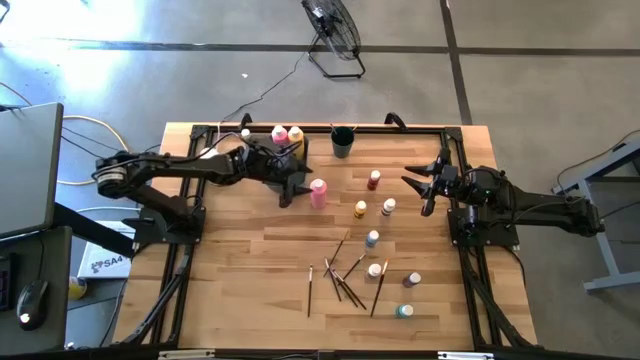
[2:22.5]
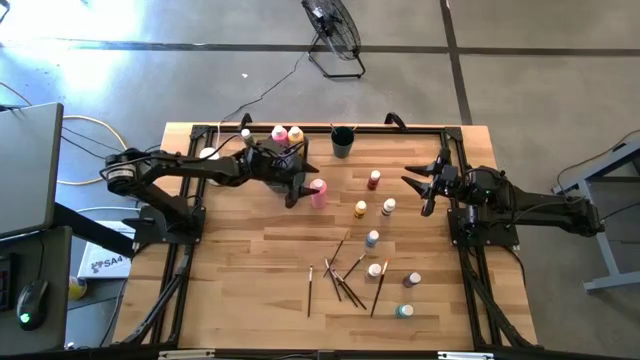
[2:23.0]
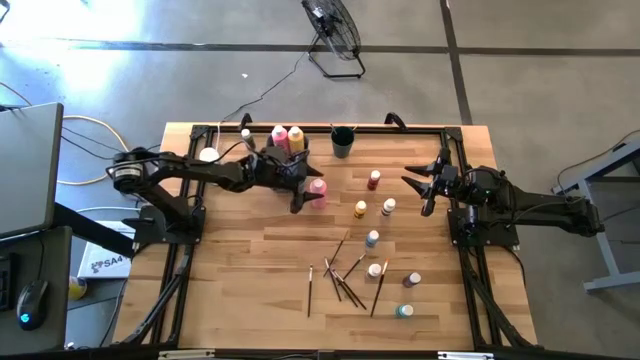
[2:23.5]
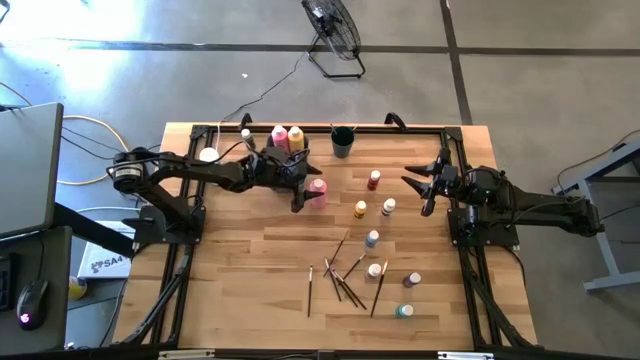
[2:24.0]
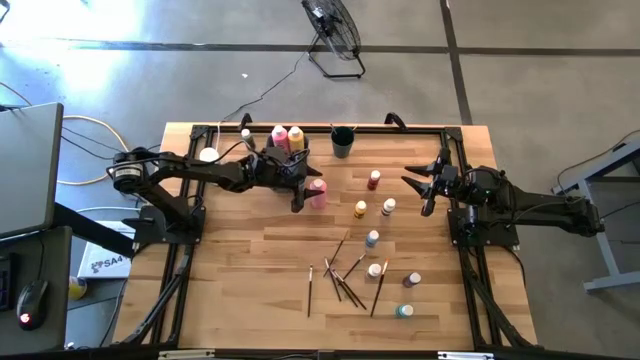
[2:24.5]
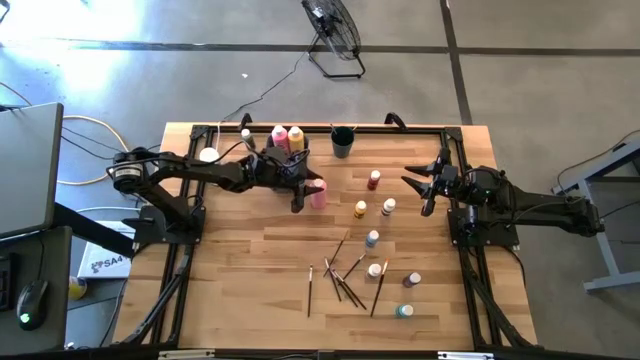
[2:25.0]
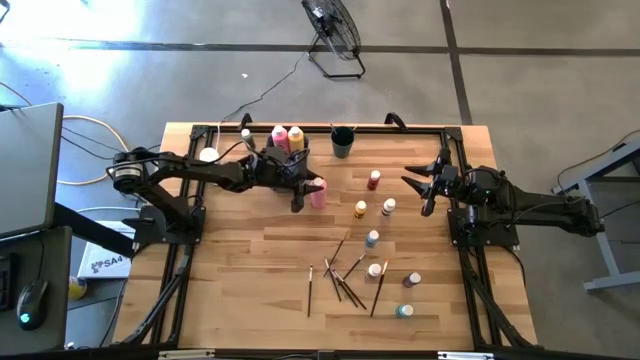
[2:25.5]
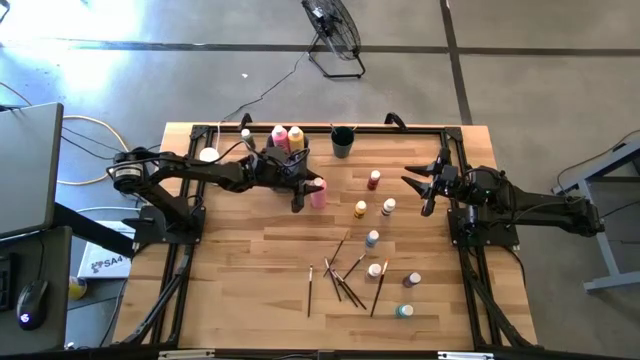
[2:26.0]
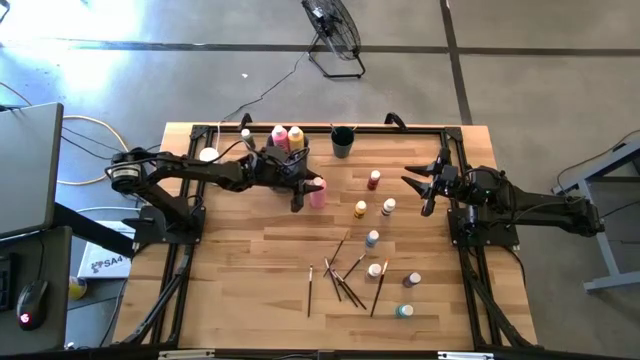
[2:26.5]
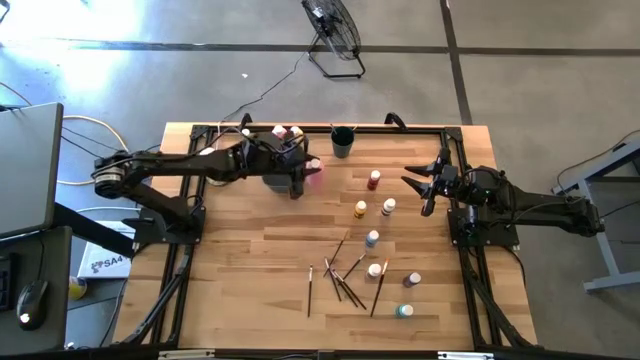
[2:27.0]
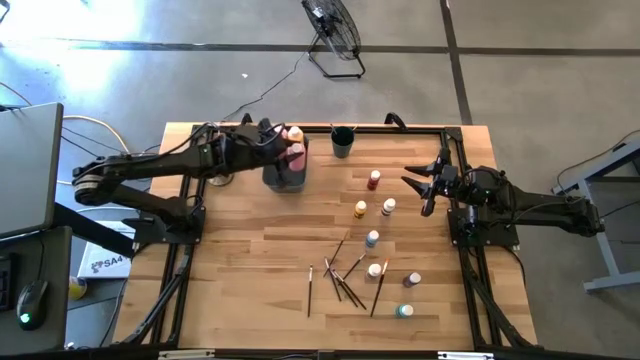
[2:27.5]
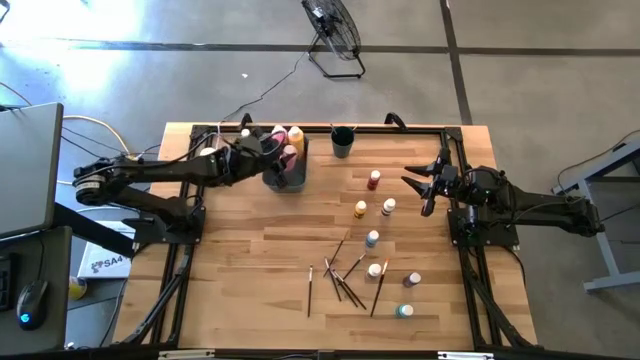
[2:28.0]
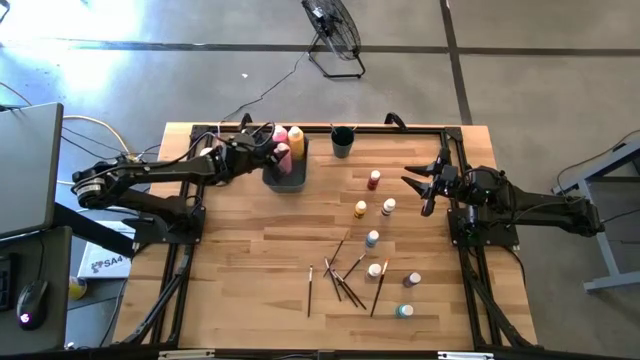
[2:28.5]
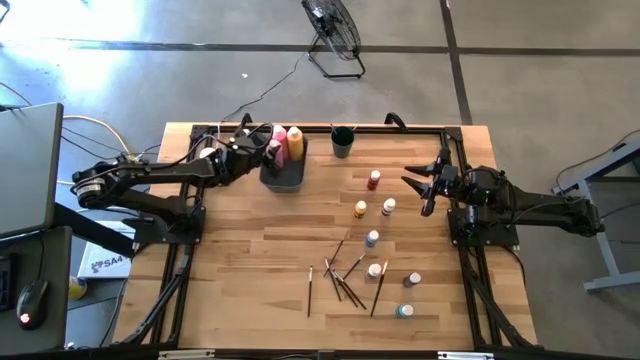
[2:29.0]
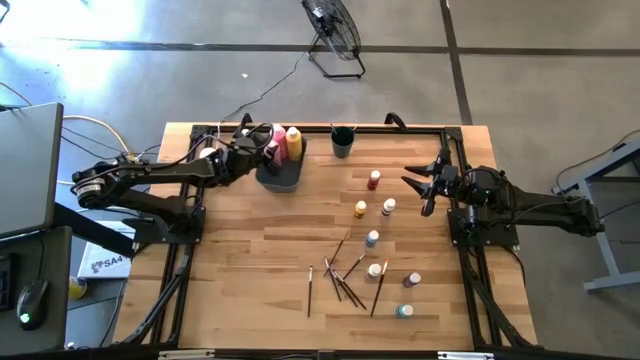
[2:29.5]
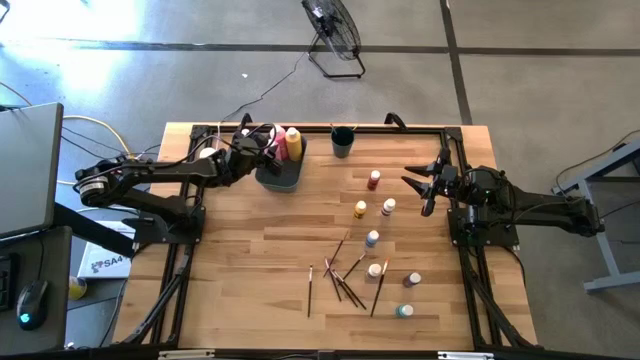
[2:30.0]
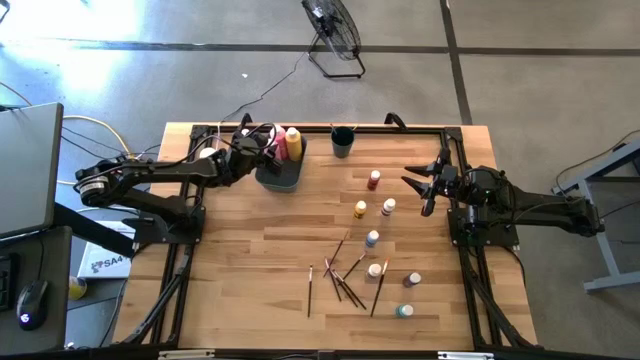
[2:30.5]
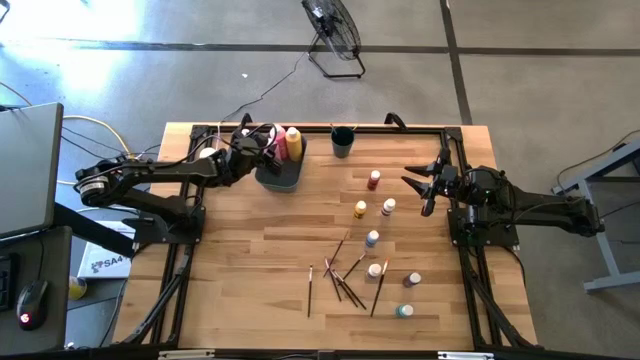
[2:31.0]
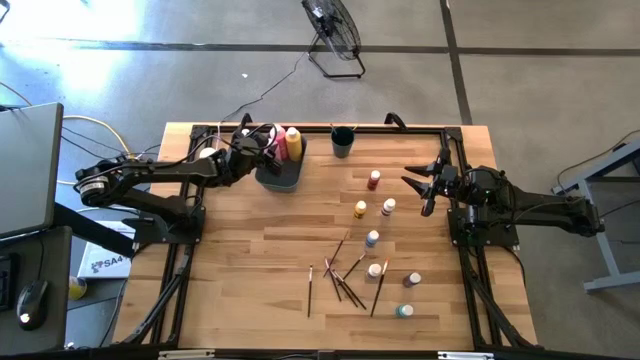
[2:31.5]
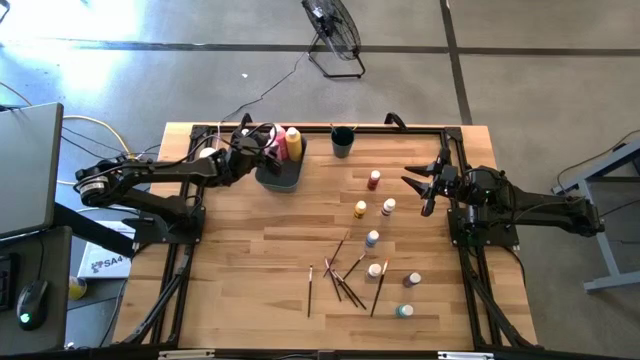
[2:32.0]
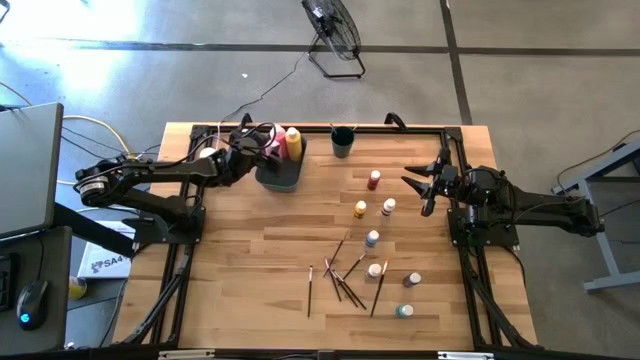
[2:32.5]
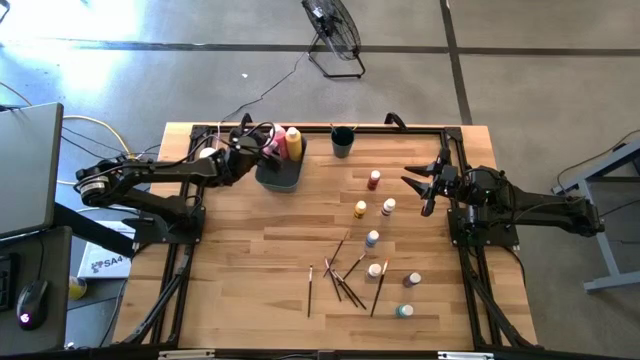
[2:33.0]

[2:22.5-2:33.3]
Task: Pick & Place Paint Supplies
Put the large pink paint bottle into the green bin

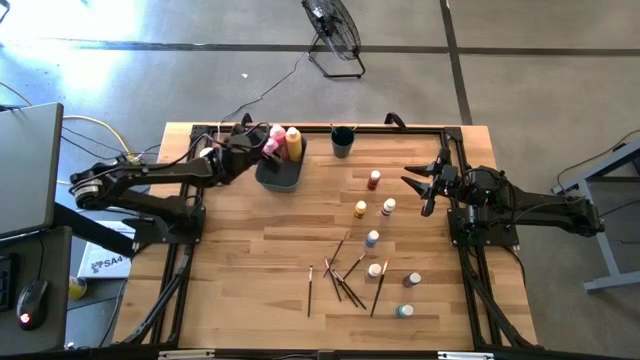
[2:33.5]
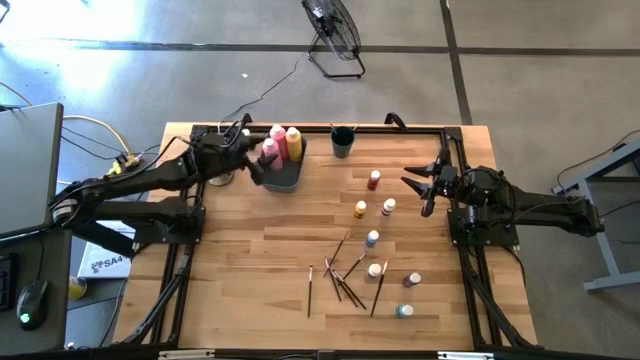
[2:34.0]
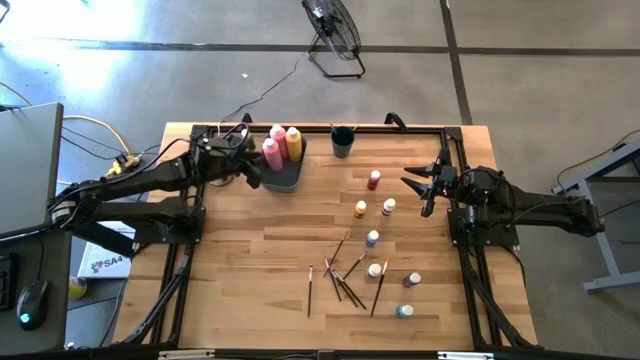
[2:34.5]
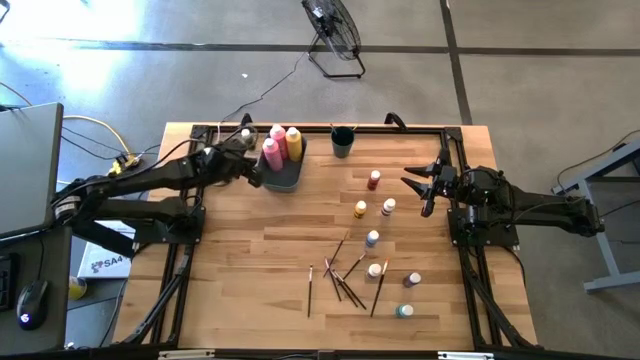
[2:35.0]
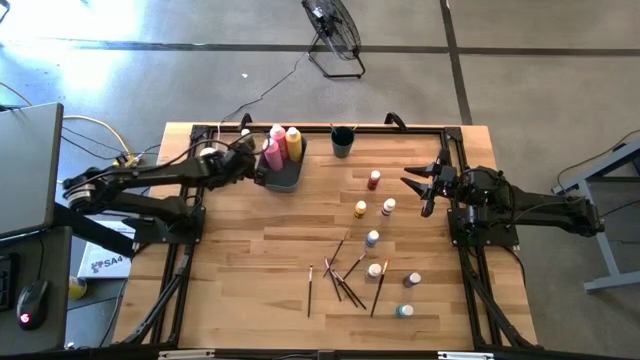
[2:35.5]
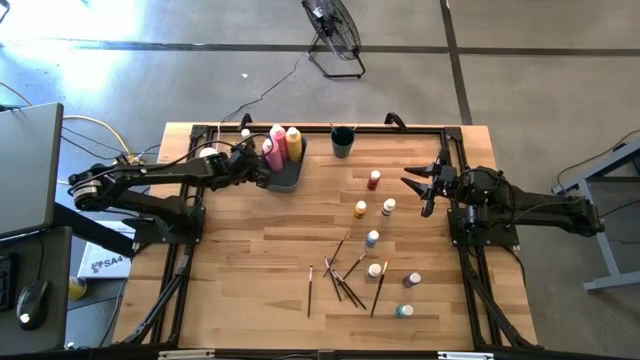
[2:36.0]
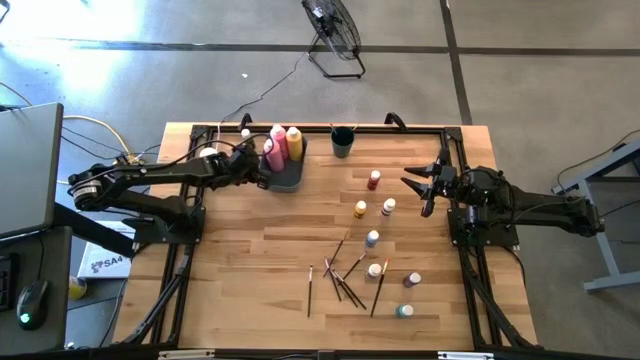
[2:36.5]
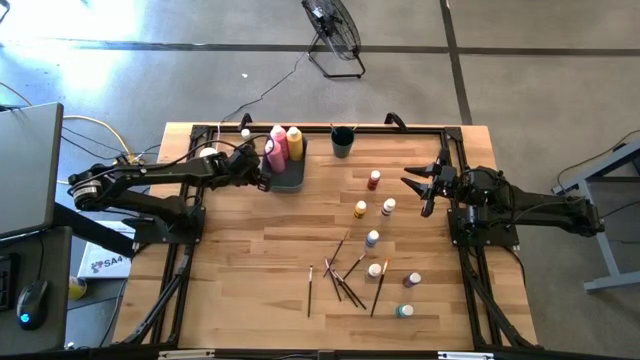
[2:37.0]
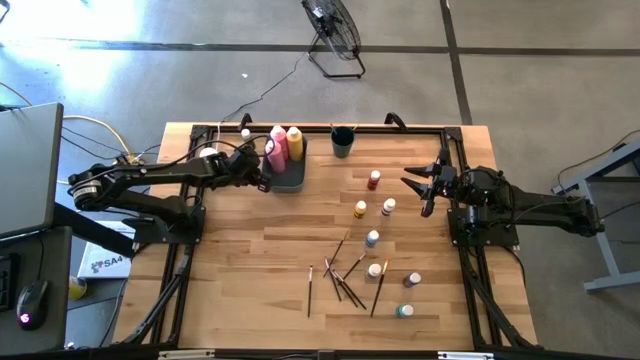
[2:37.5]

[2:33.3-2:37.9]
Adjust the green bin
